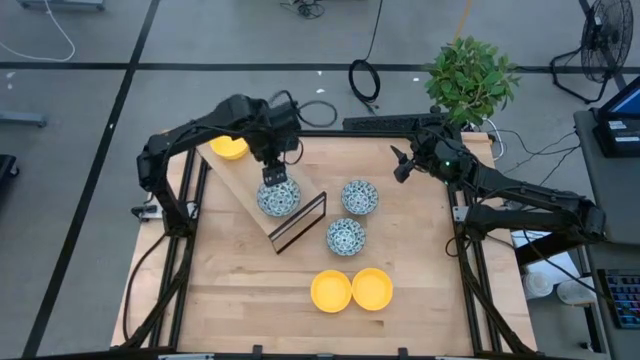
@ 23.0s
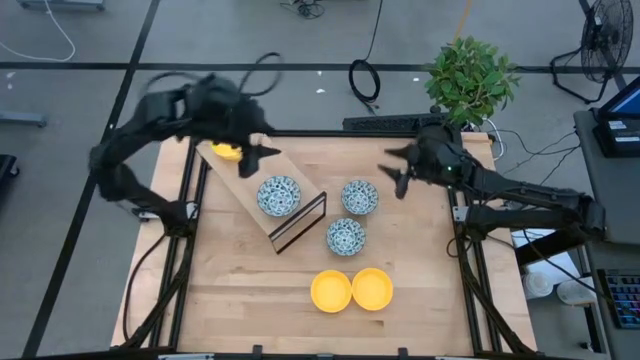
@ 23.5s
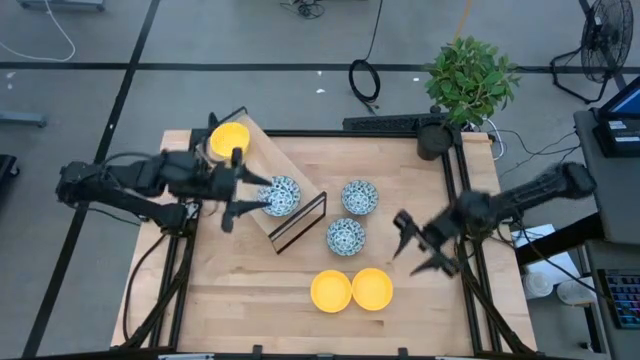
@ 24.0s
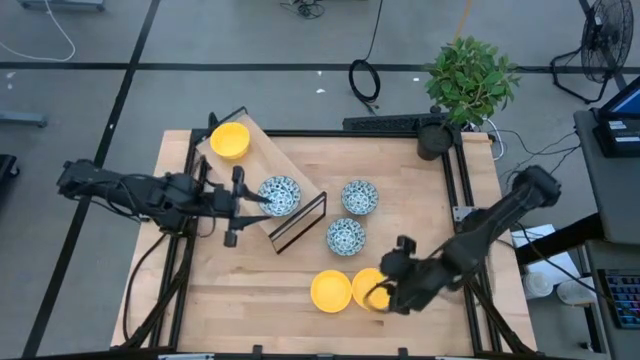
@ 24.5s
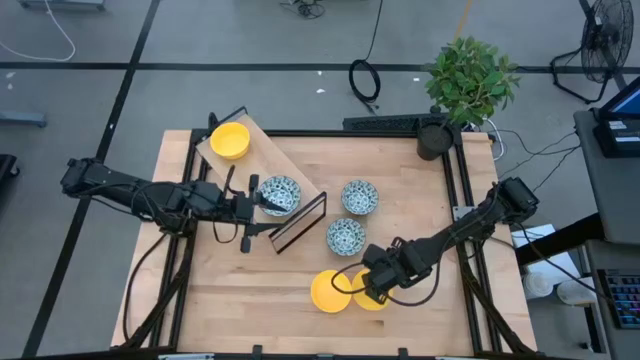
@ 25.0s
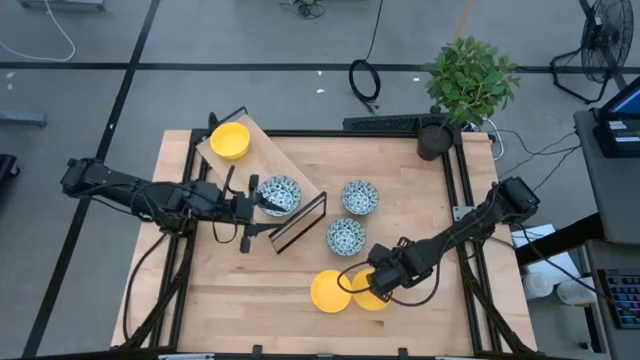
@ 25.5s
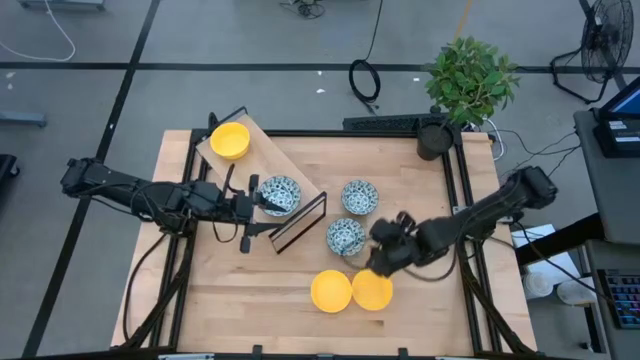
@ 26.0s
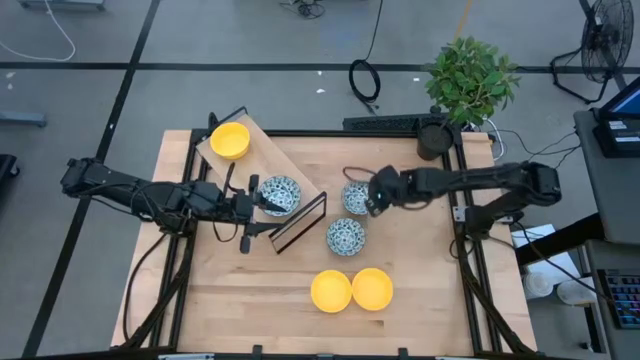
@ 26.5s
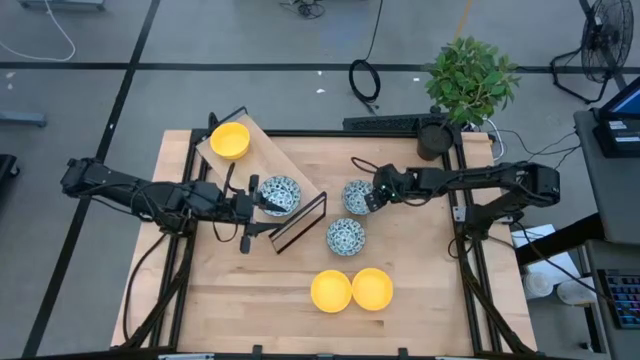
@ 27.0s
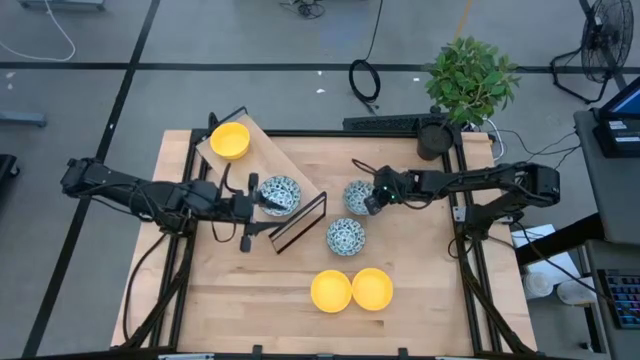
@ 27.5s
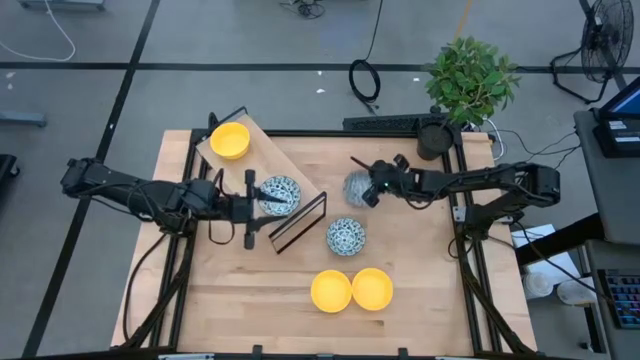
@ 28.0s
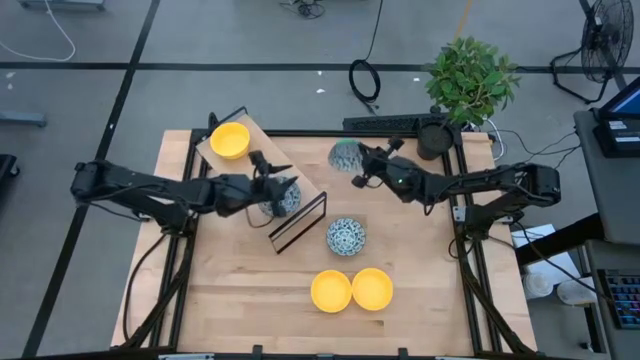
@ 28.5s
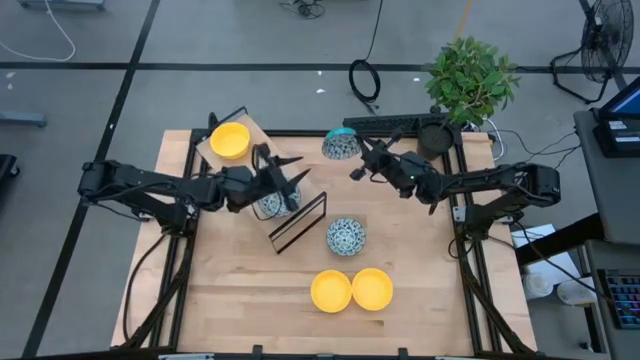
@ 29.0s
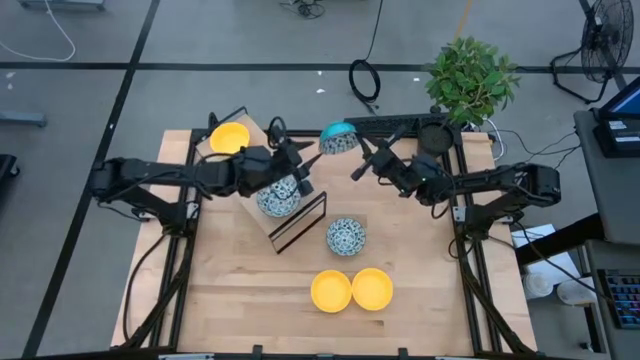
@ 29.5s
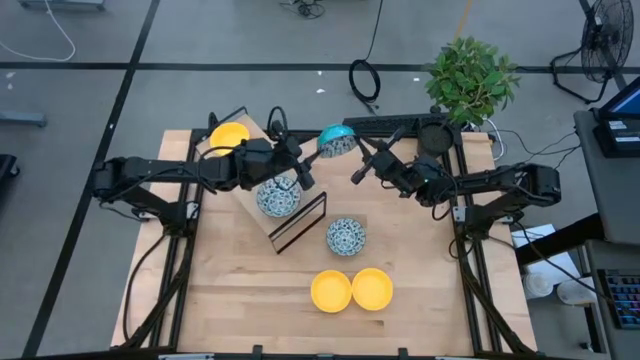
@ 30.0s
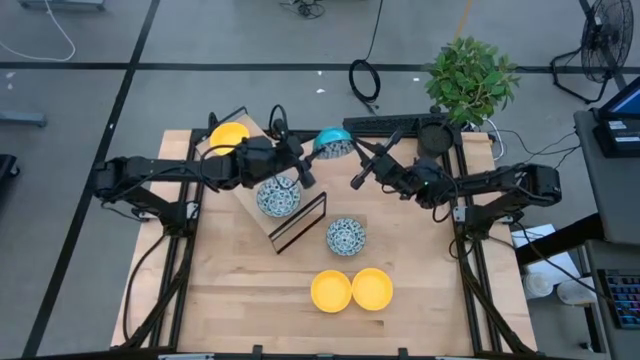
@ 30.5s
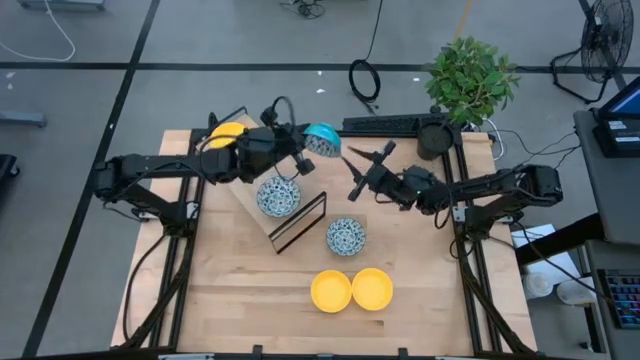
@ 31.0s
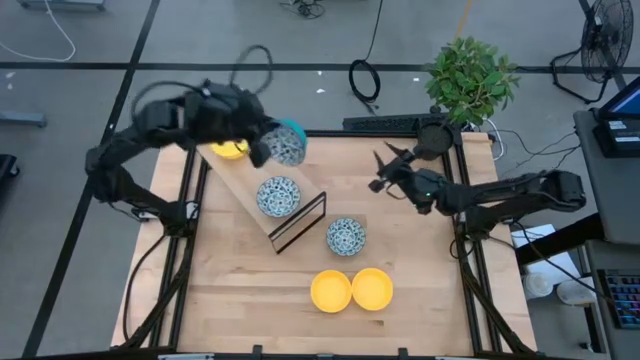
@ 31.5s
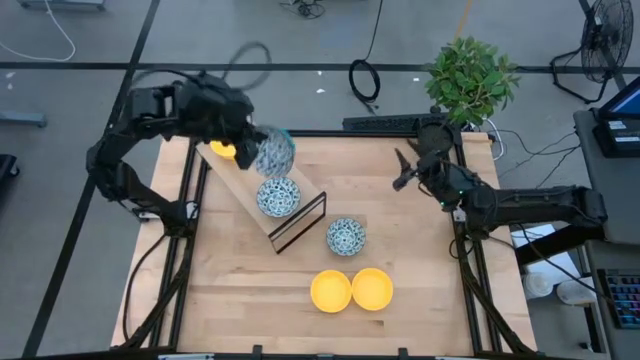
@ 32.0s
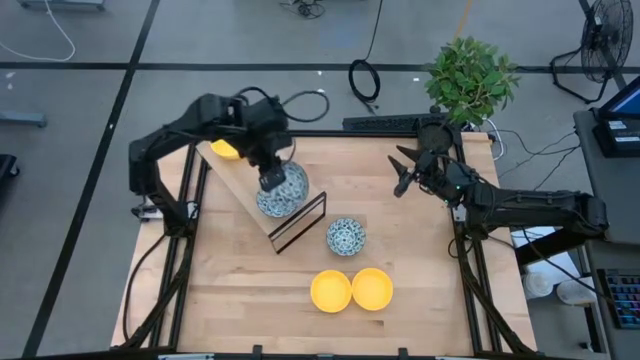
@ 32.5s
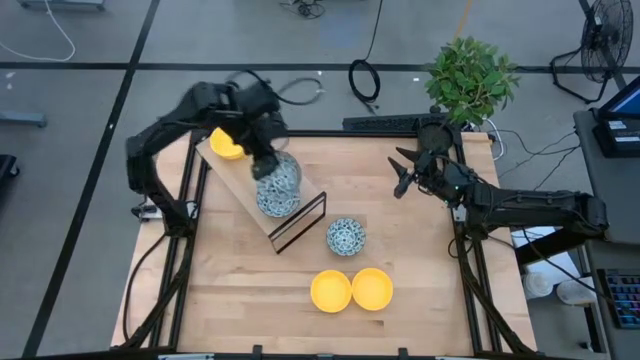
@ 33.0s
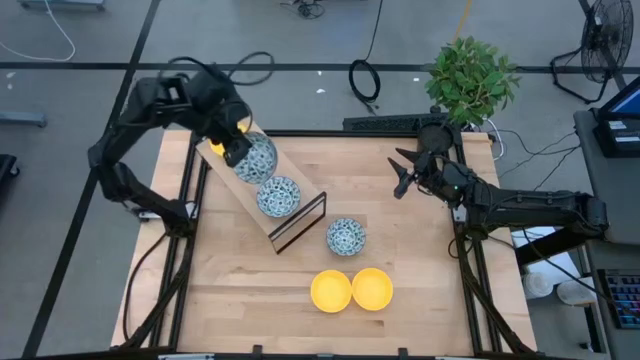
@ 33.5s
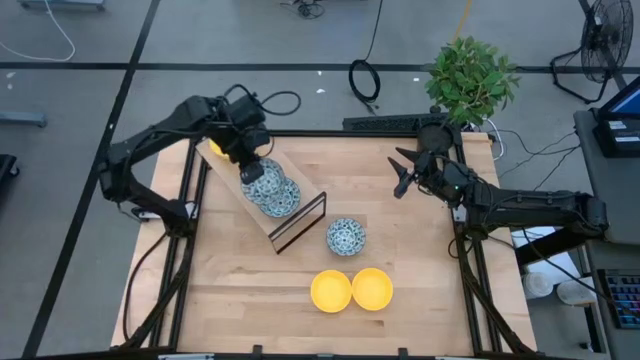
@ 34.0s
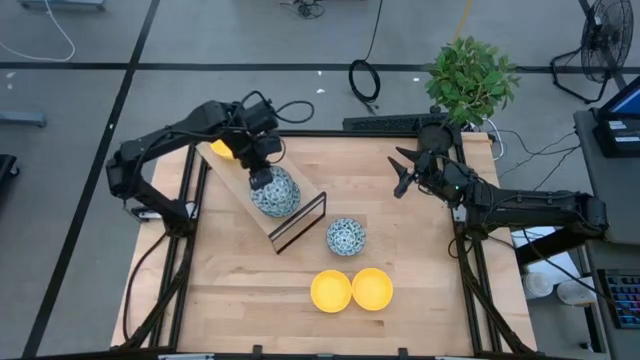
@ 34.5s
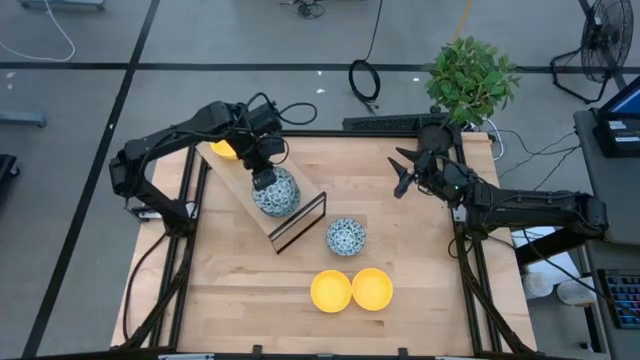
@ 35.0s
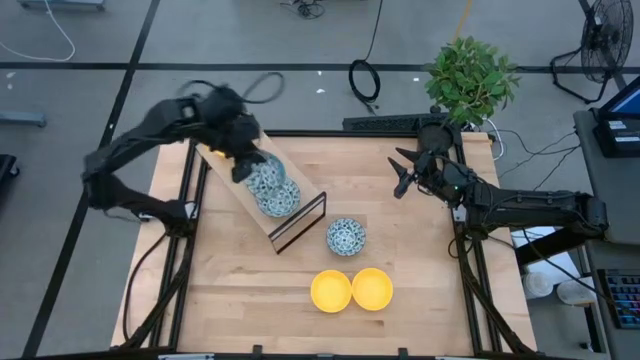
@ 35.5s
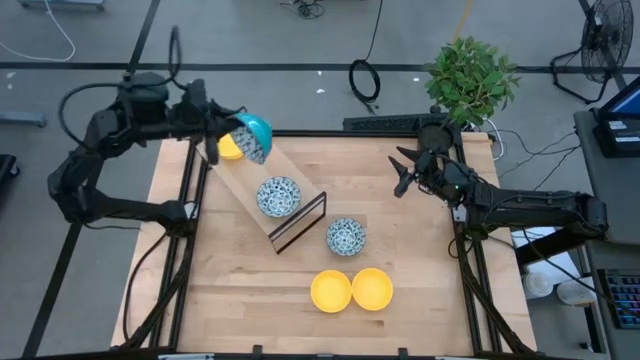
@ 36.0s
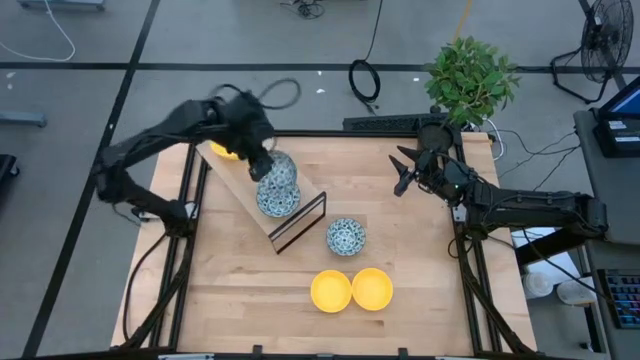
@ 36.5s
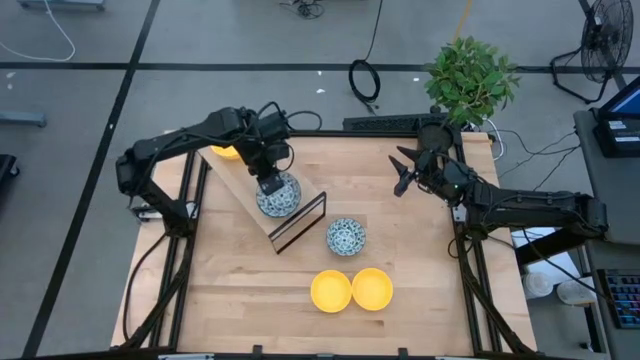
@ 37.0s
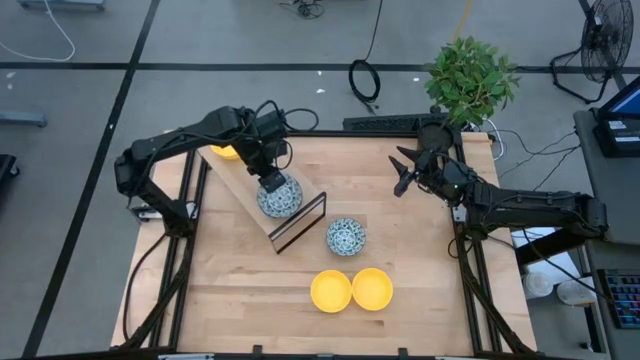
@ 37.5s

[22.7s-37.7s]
Task: Pick & Place Mini bowls
Stack the top green patterned bowl on the green patterned bowl on the shelf

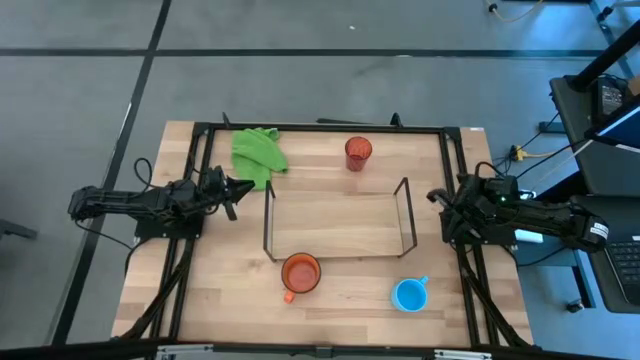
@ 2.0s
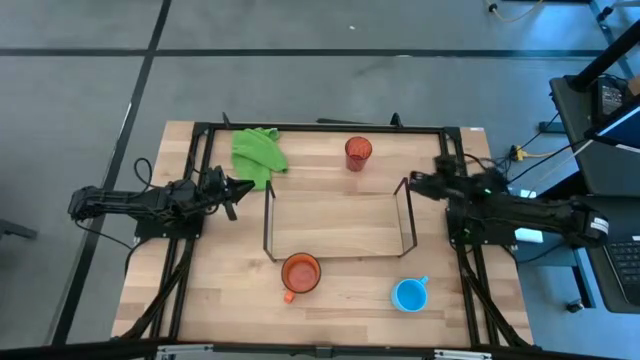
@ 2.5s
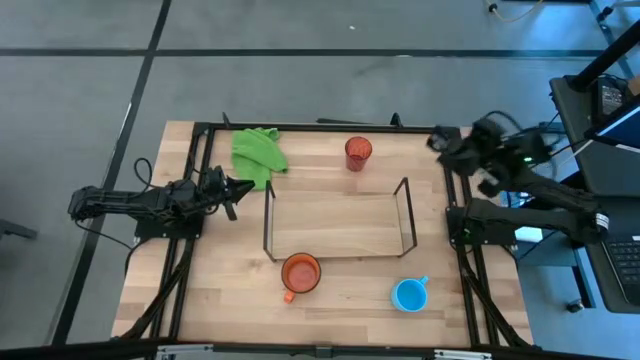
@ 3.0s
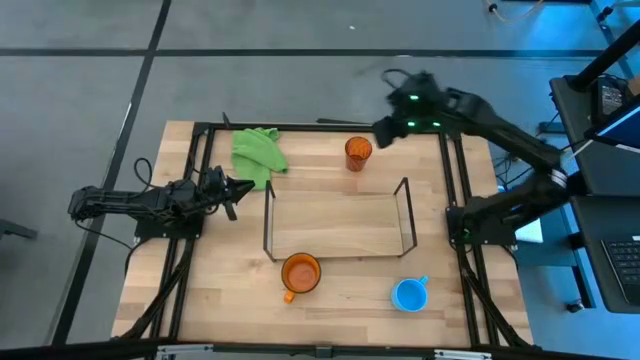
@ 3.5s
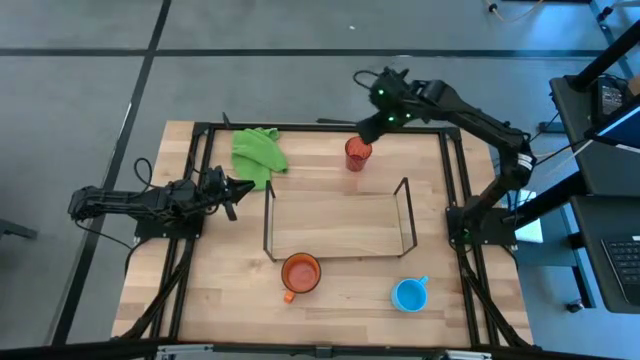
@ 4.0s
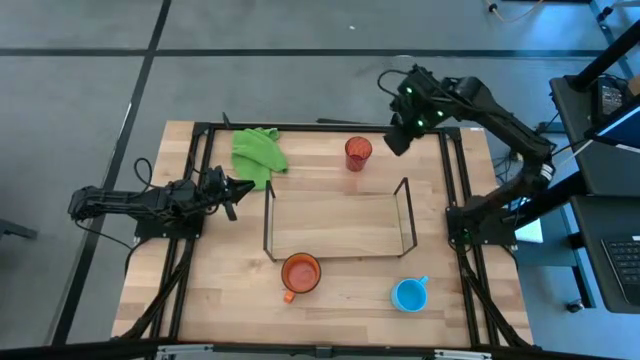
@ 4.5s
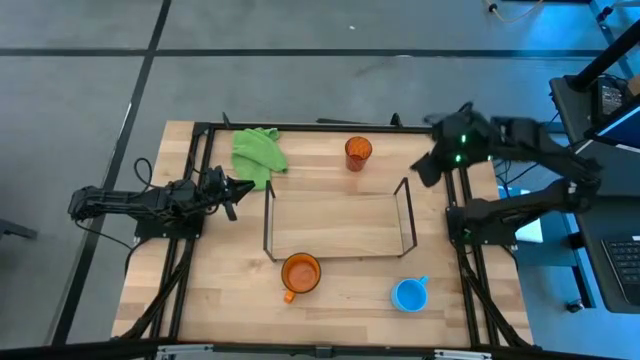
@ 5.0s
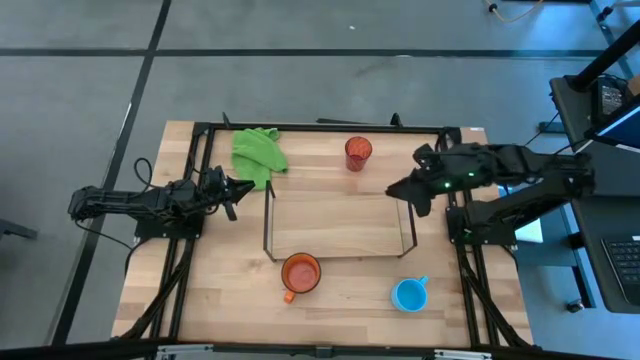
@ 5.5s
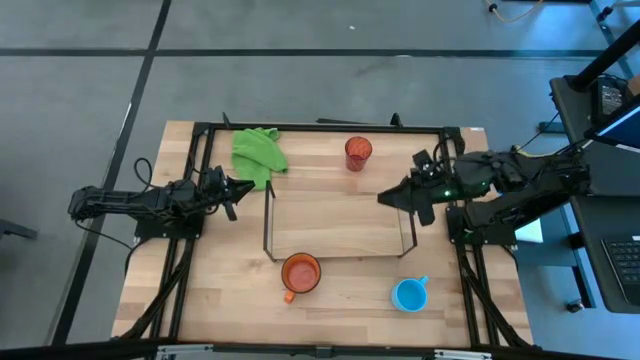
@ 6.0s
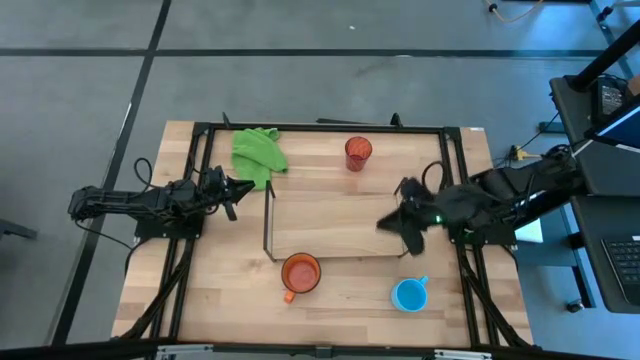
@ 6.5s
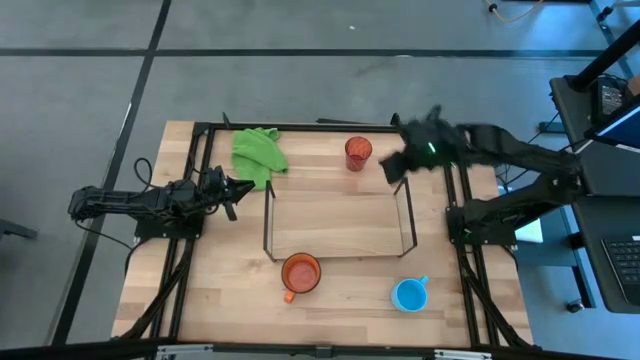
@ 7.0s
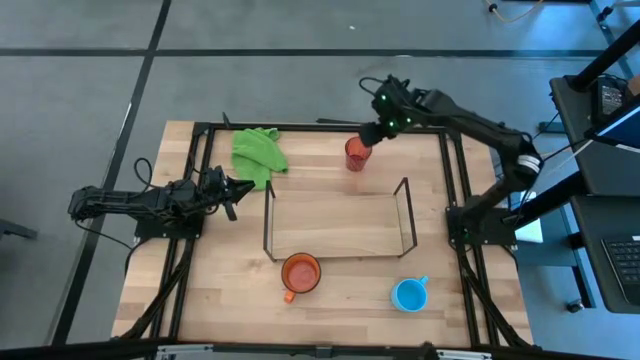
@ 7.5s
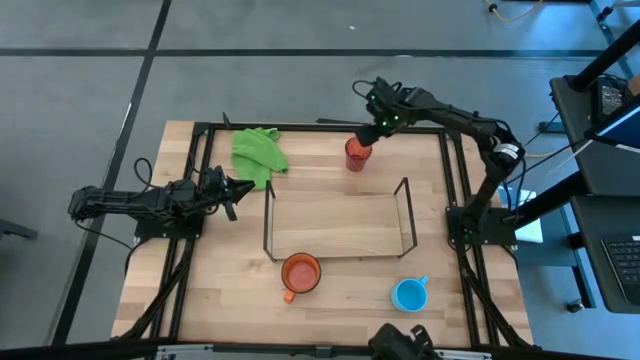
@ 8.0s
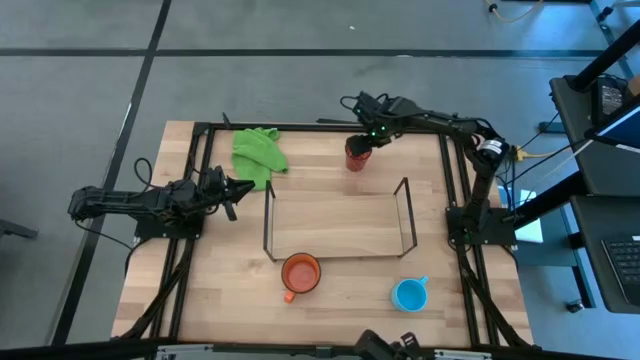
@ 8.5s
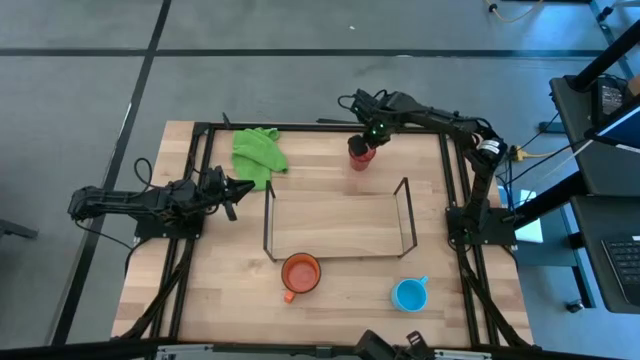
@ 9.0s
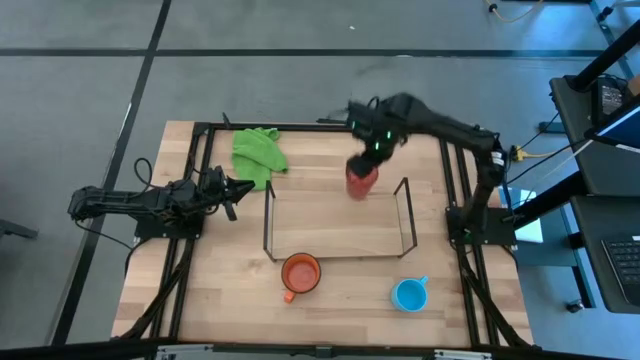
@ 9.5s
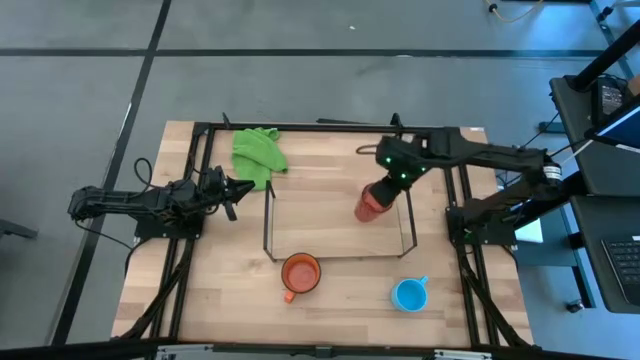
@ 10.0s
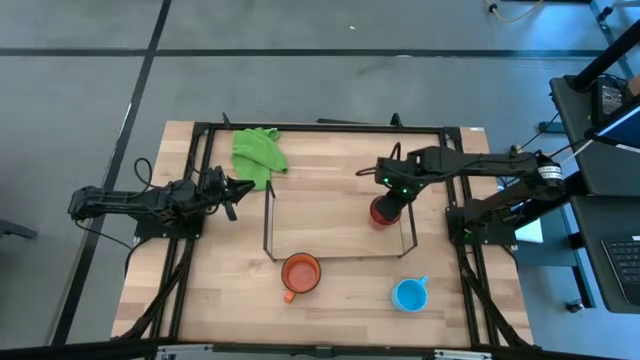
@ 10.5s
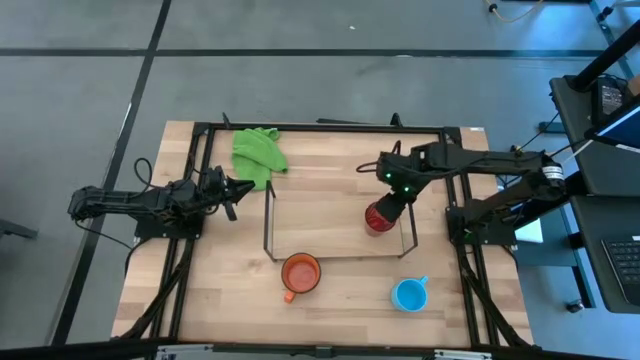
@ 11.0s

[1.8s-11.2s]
Task: Stack small to large cups/mugs on shelf
Put the orange cup on the shelf
